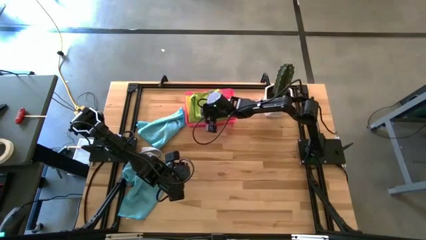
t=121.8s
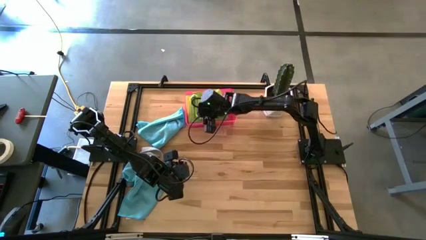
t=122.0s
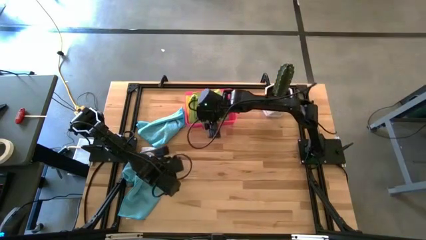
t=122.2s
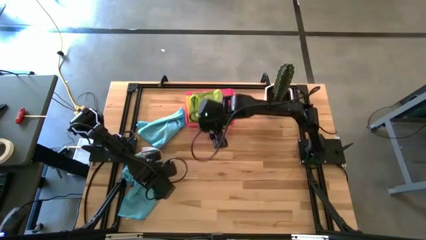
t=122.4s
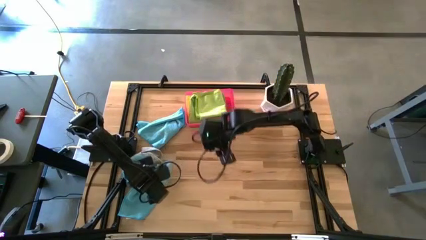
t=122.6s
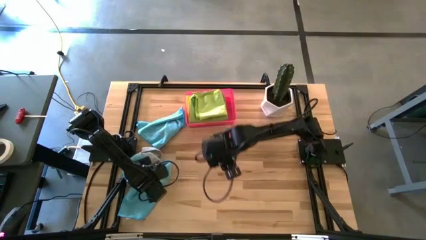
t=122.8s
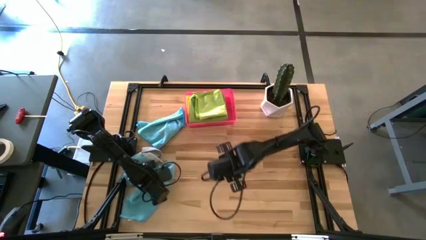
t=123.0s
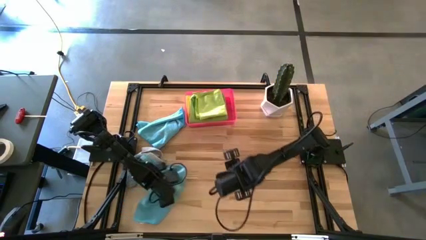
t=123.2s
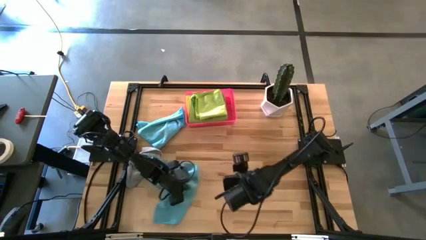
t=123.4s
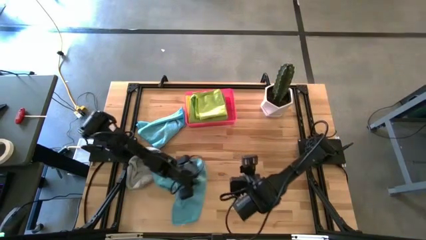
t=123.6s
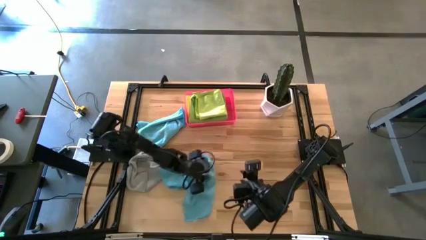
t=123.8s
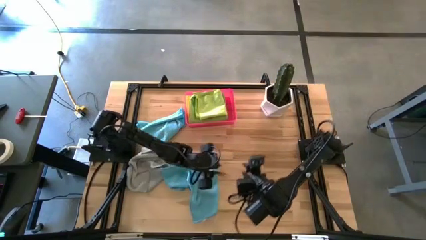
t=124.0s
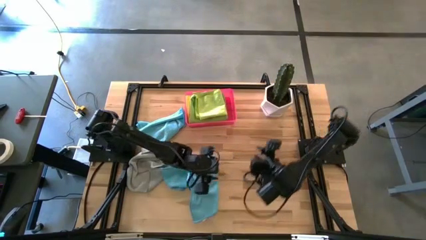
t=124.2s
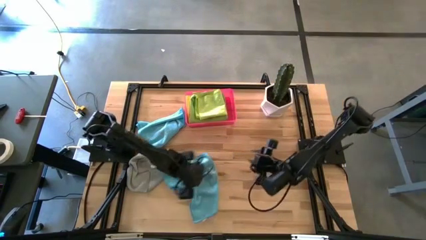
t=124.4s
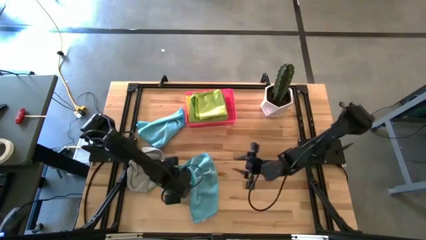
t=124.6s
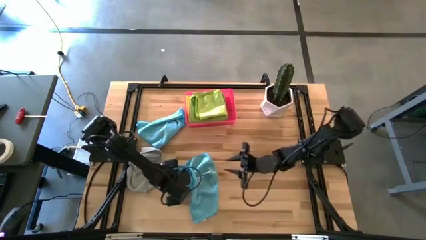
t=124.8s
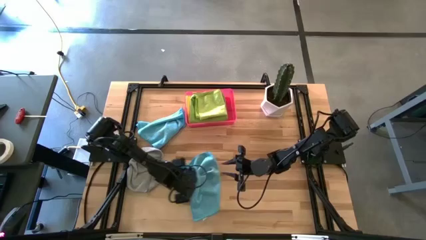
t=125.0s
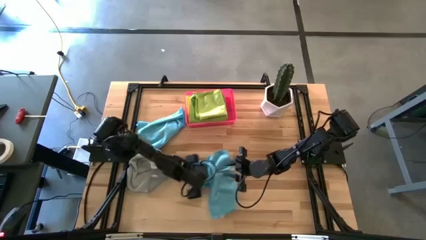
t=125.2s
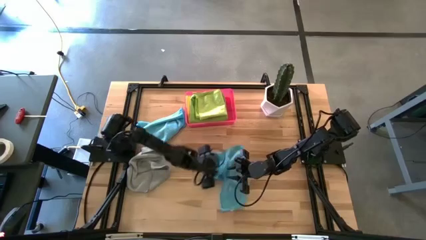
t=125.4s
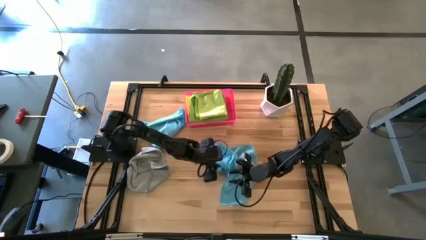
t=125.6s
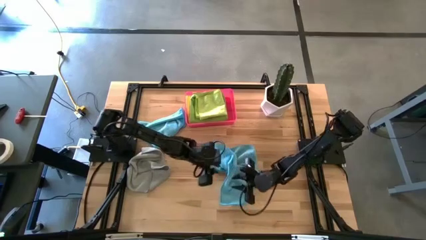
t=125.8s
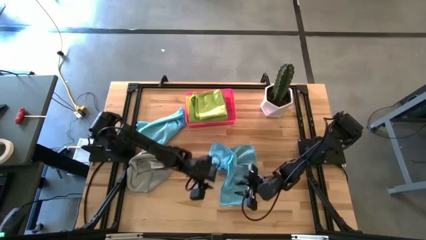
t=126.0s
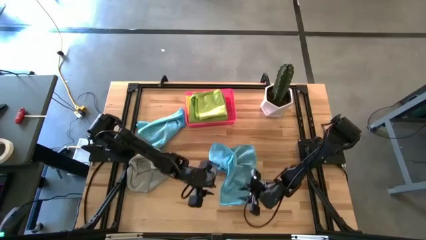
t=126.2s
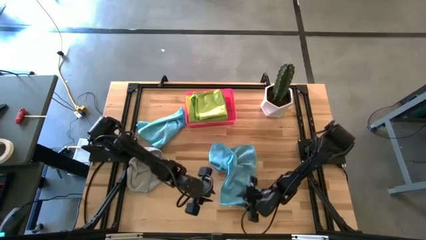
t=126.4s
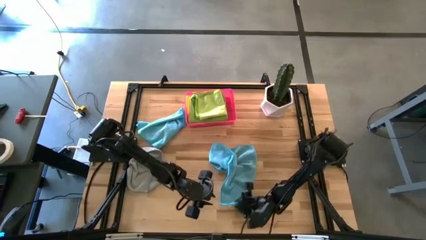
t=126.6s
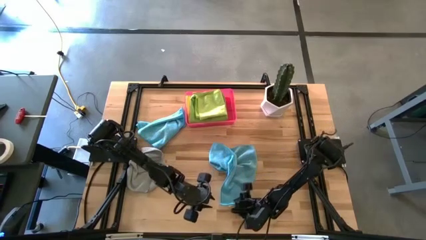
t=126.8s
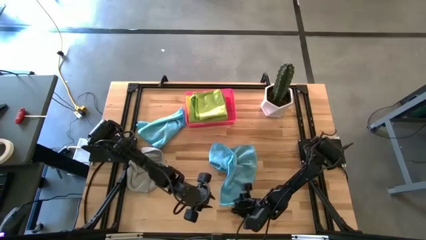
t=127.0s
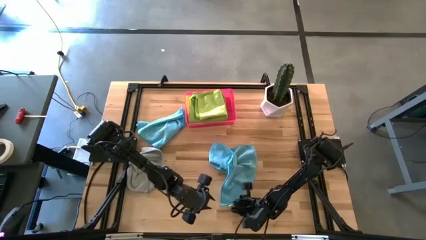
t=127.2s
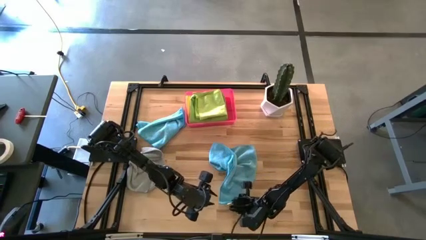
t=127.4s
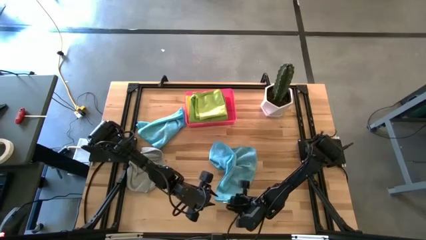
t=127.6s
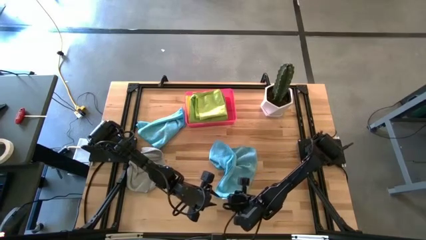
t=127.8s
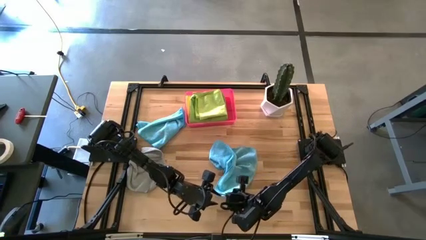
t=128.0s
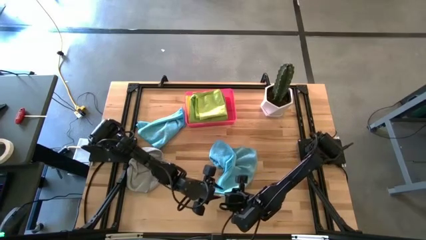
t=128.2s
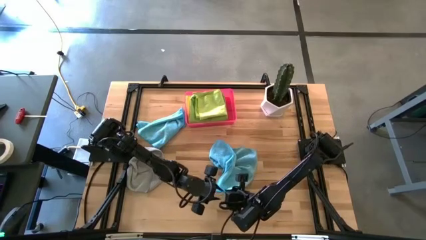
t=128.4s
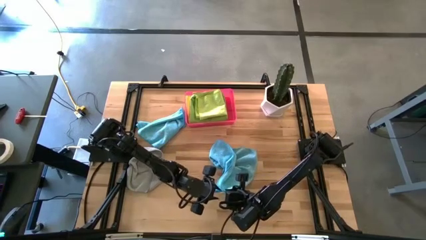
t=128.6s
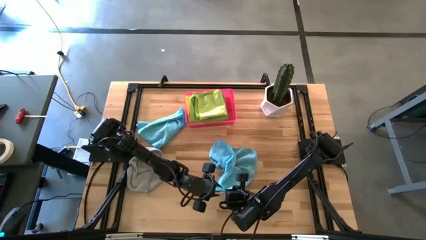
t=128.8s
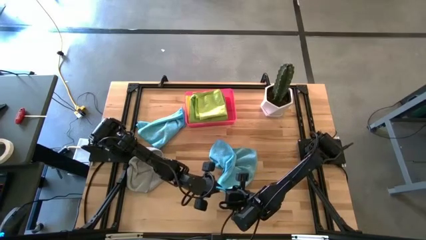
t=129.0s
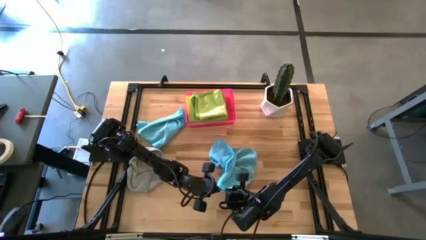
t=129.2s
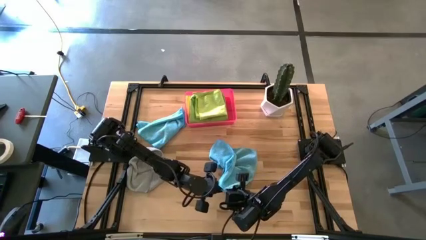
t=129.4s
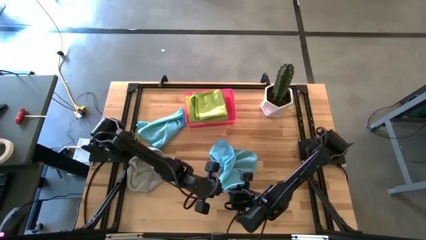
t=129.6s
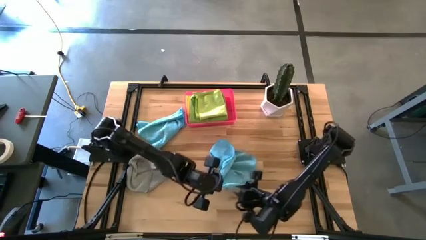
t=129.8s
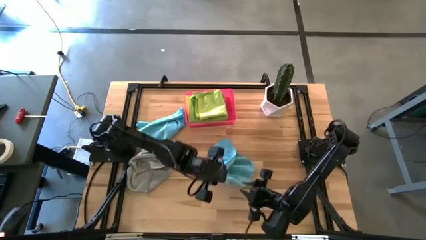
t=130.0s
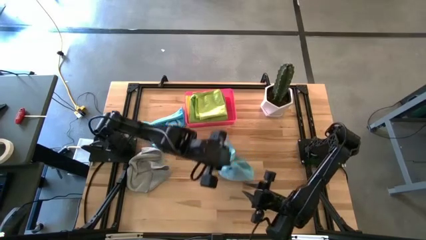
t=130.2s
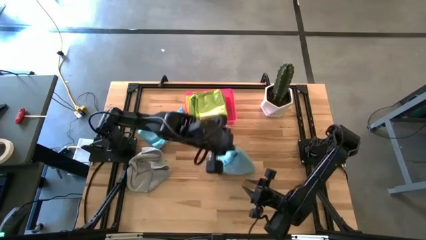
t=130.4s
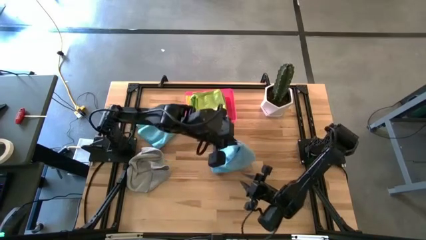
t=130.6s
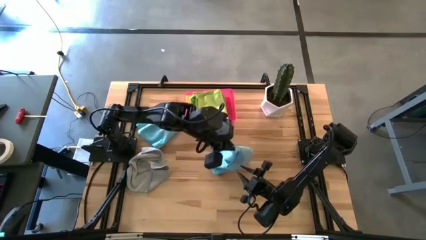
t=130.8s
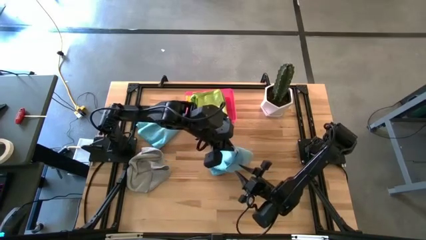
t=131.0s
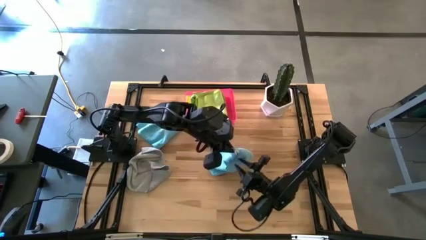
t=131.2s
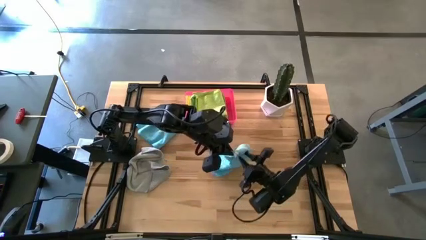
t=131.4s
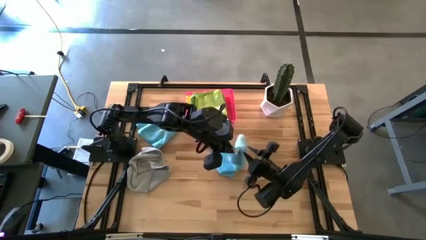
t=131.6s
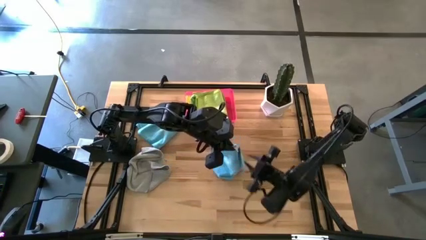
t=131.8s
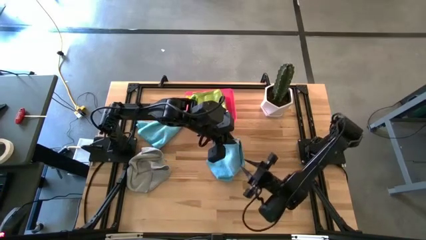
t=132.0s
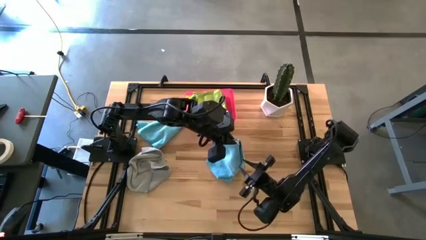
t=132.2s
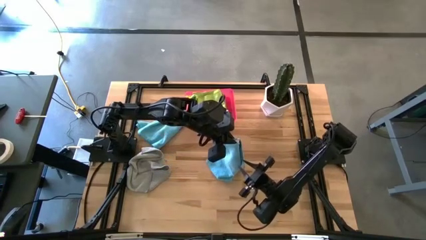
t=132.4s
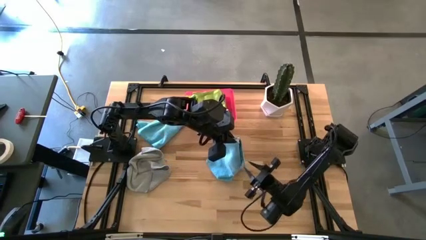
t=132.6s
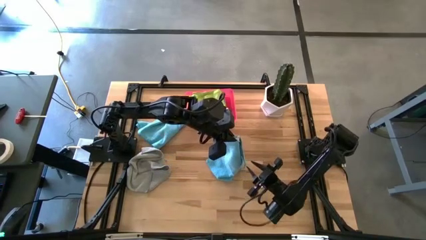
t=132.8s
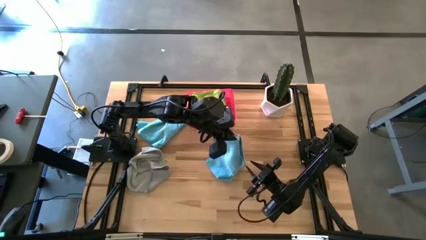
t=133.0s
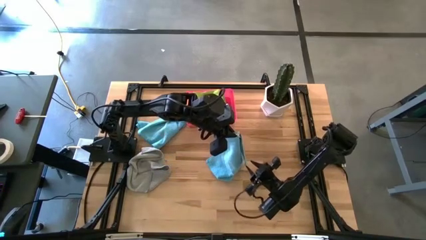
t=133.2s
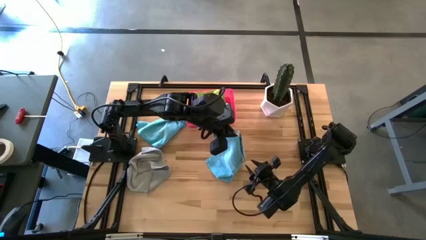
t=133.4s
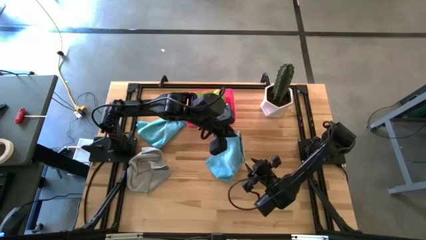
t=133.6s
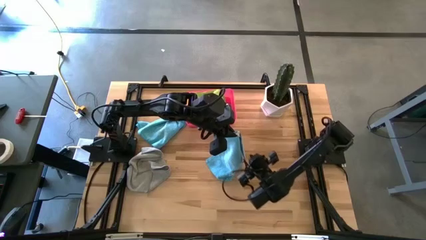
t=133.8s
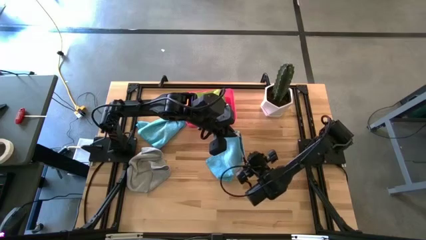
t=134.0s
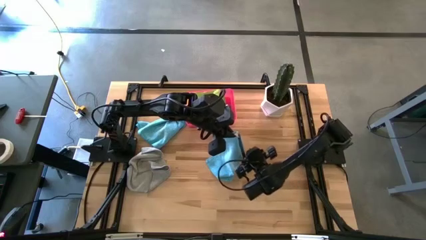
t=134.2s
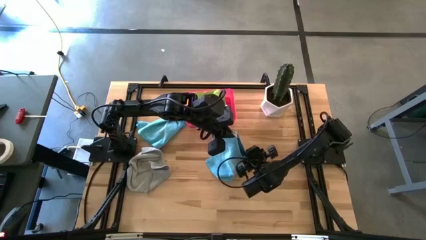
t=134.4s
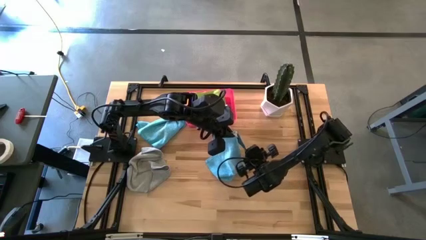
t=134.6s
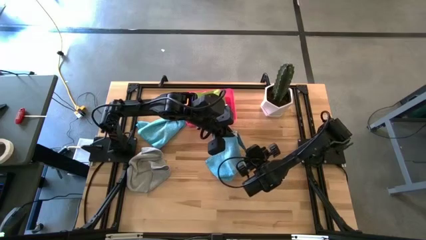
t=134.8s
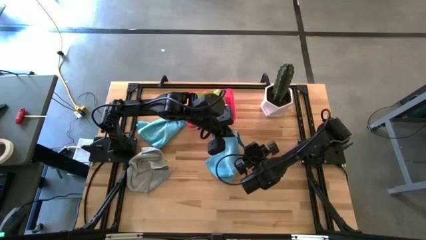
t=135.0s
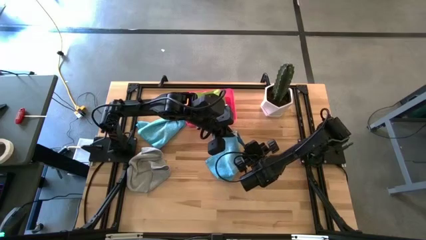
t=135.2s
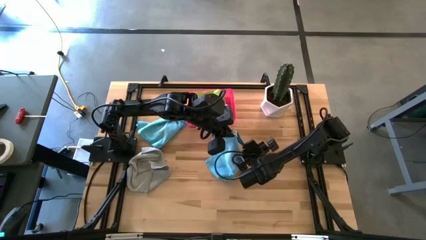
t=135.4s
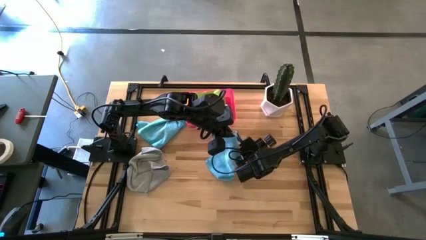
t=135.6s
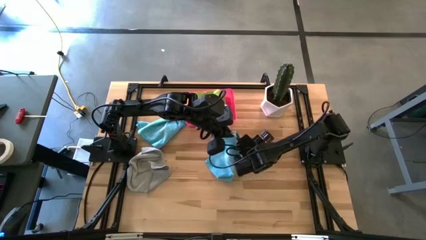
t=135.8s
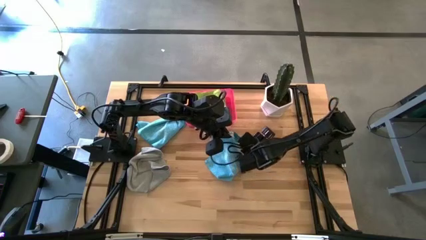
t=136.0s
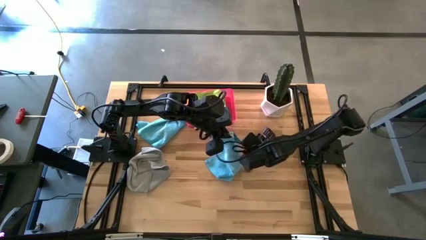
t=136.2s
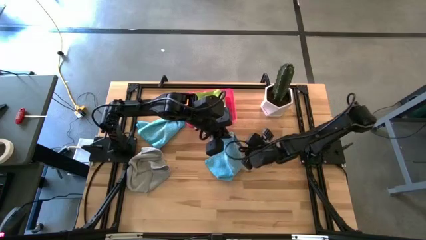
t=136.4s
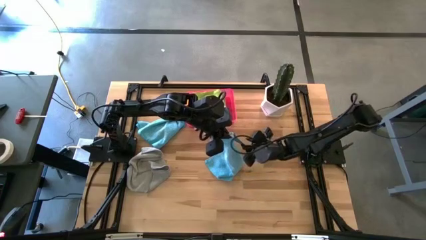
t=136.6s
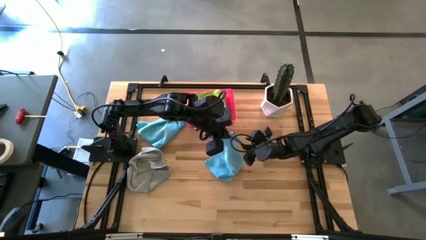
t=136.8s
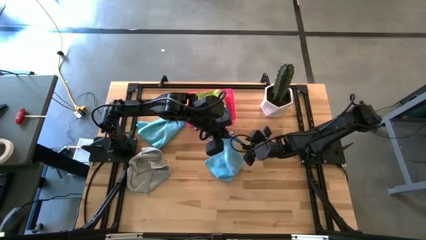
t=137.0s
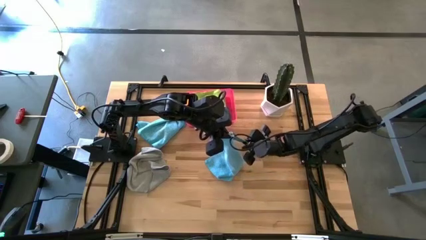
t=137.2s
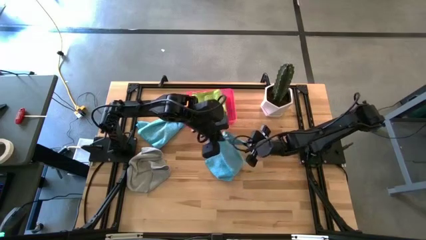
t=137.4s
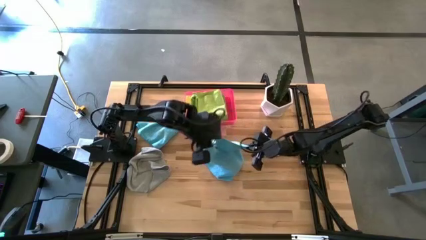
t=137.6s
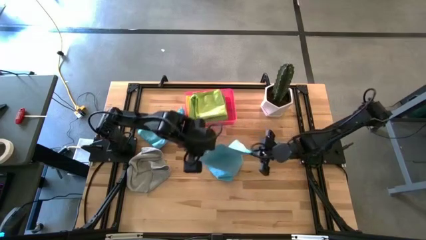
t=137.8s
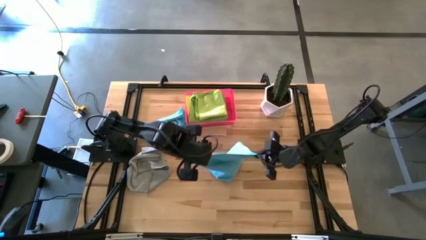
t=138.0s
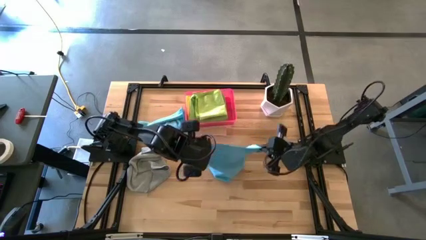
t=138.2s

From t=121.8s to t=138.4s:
Task: Fold microfiber towels
Fold the bottom blue microfiber cloth
